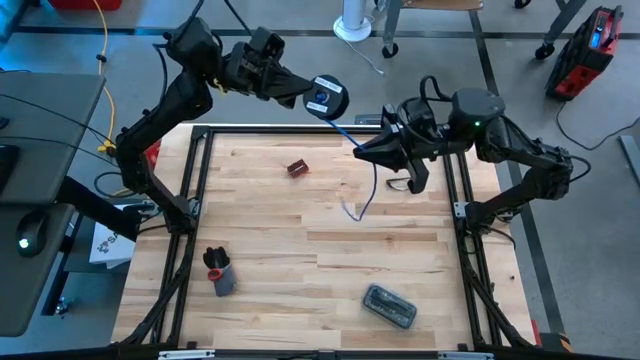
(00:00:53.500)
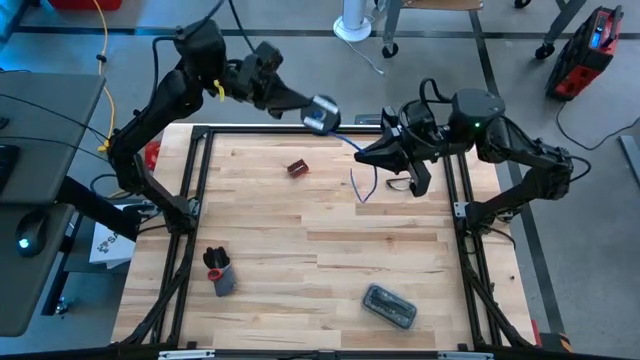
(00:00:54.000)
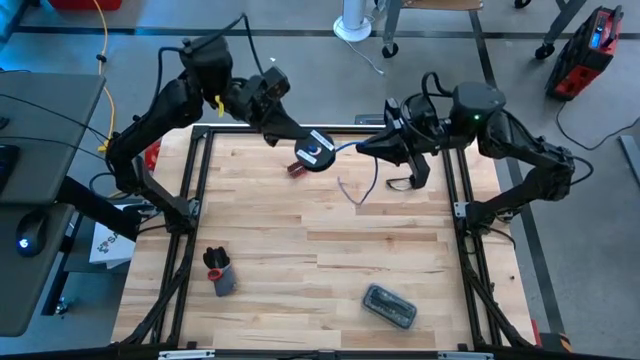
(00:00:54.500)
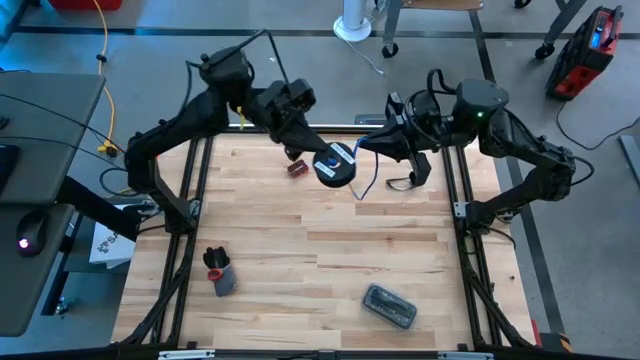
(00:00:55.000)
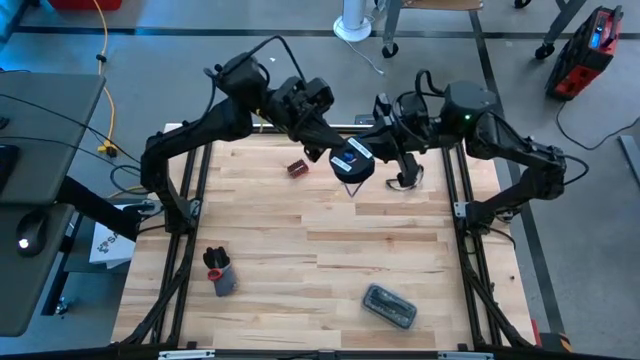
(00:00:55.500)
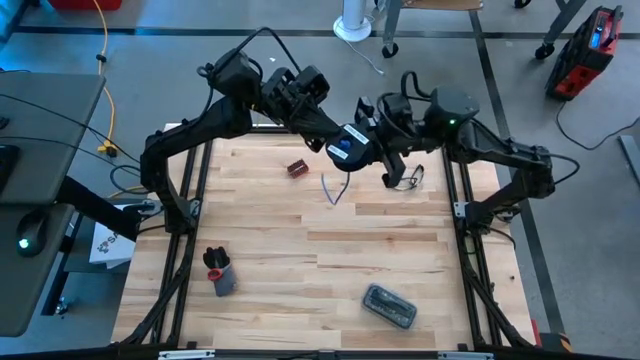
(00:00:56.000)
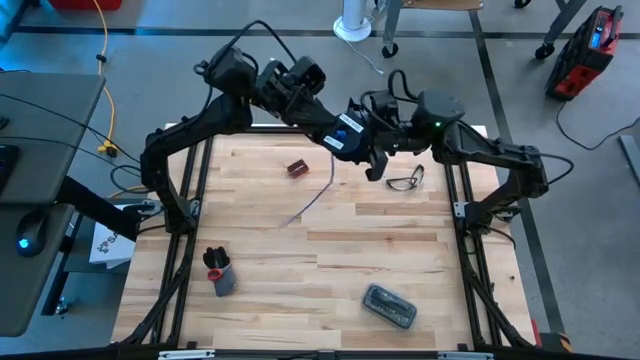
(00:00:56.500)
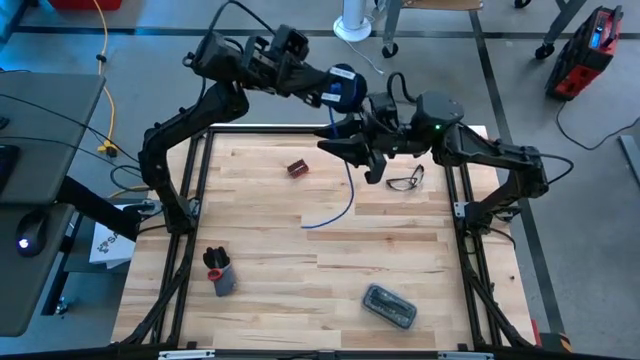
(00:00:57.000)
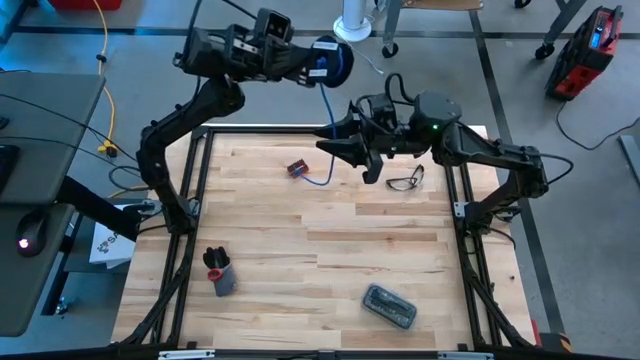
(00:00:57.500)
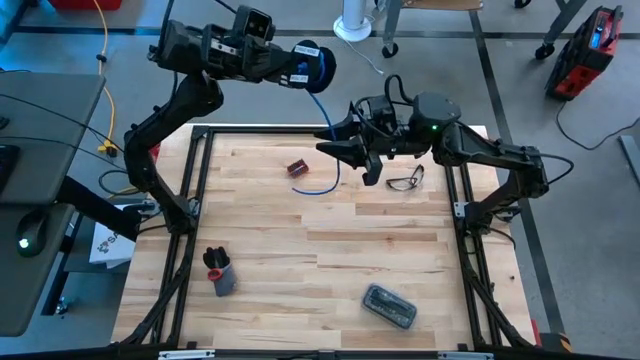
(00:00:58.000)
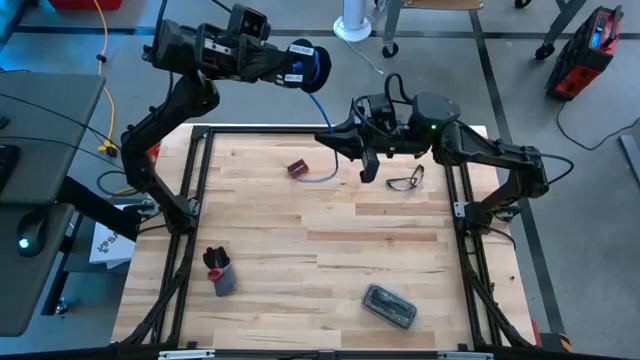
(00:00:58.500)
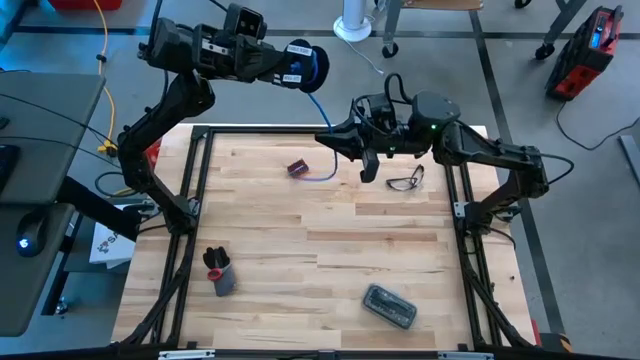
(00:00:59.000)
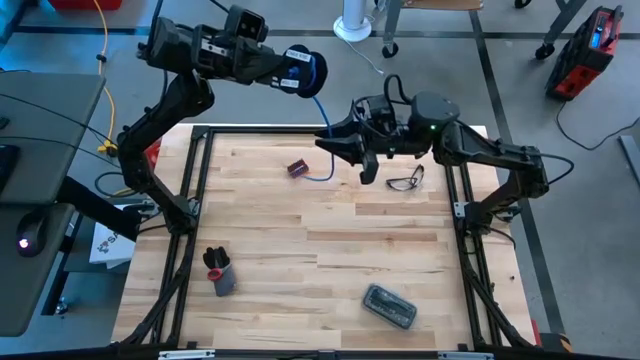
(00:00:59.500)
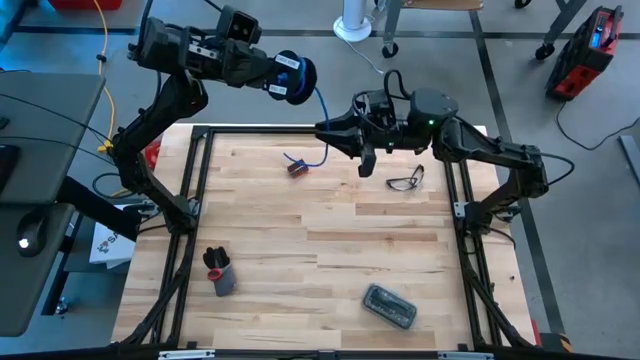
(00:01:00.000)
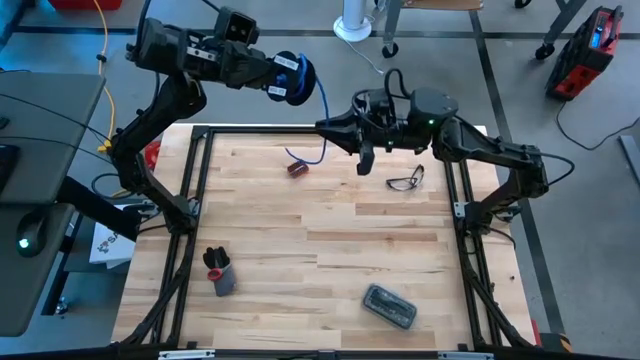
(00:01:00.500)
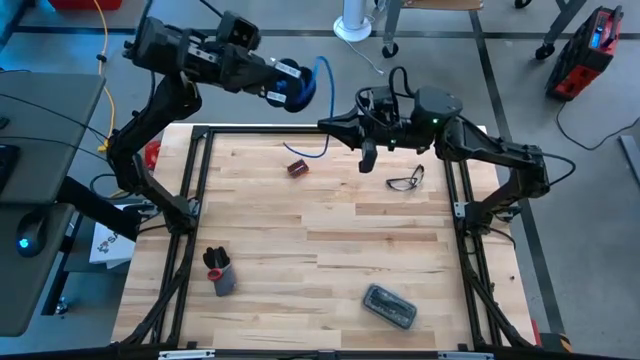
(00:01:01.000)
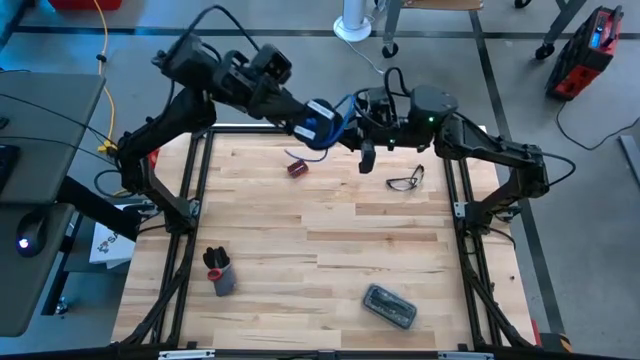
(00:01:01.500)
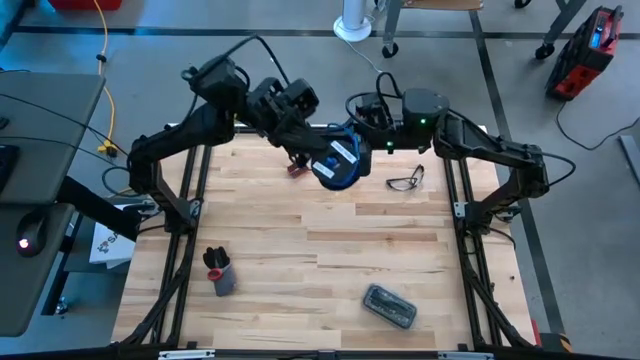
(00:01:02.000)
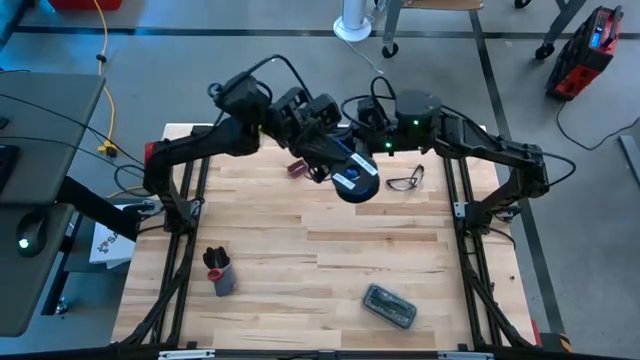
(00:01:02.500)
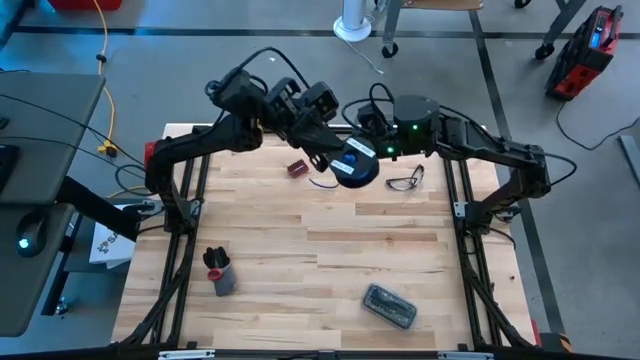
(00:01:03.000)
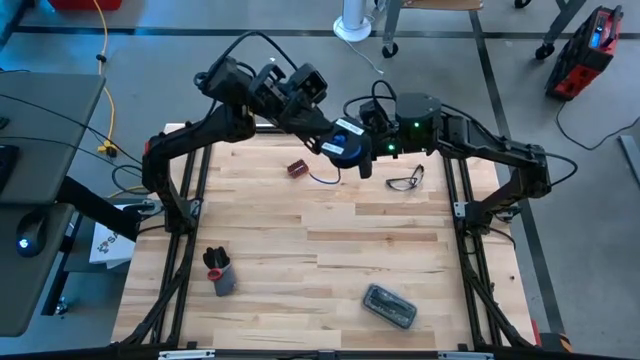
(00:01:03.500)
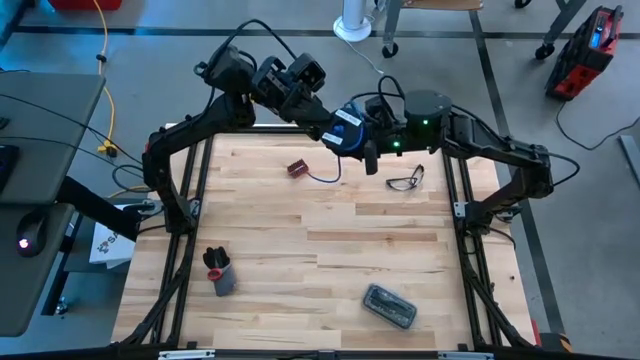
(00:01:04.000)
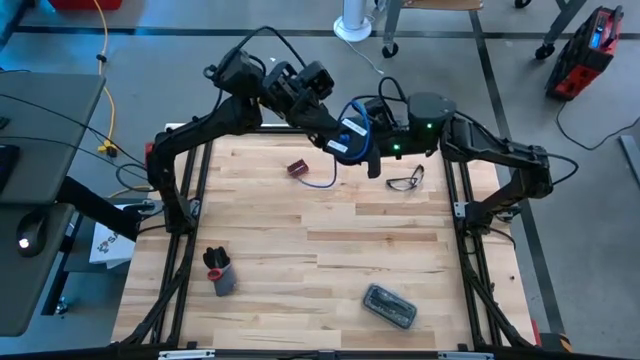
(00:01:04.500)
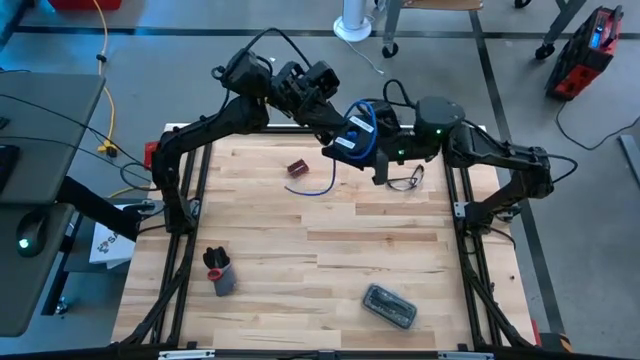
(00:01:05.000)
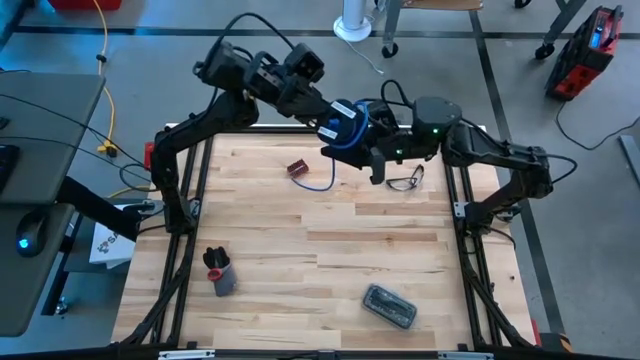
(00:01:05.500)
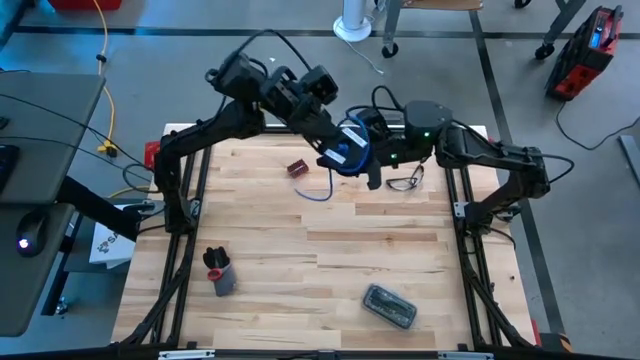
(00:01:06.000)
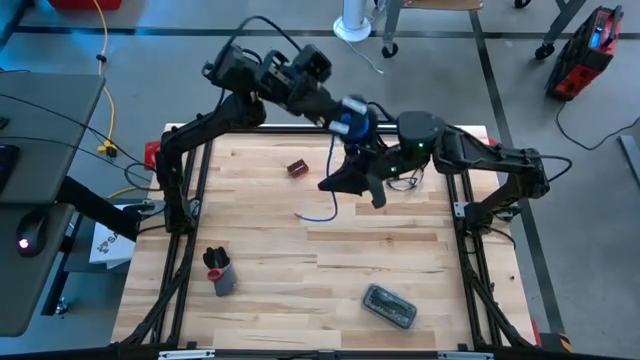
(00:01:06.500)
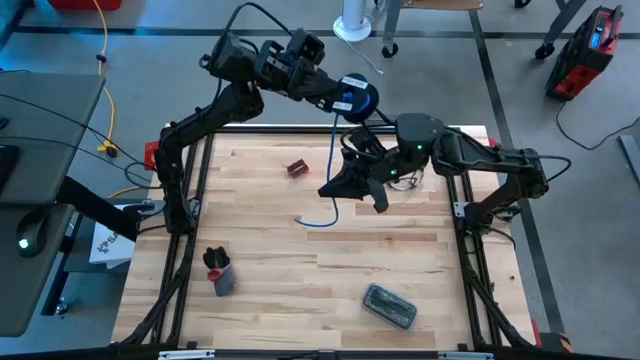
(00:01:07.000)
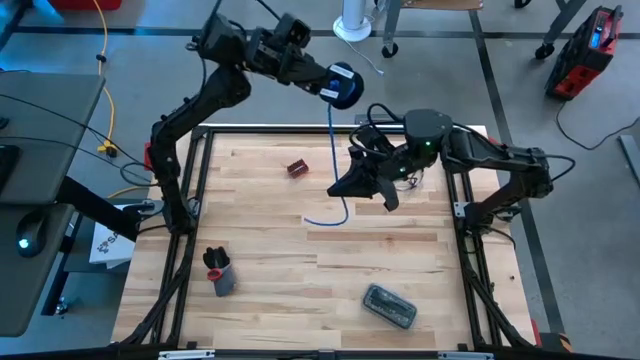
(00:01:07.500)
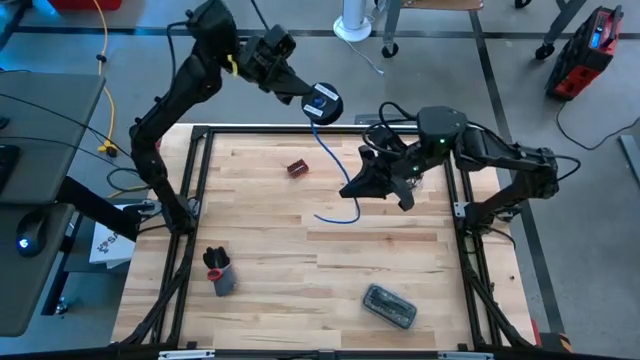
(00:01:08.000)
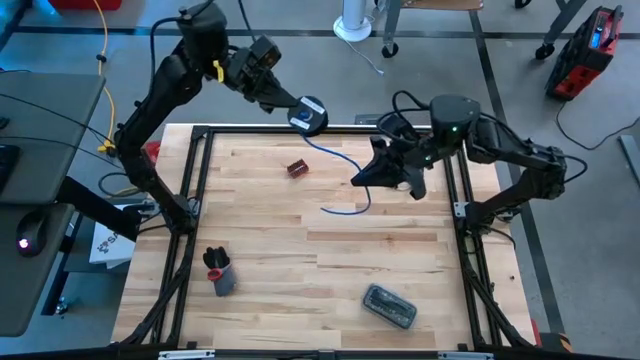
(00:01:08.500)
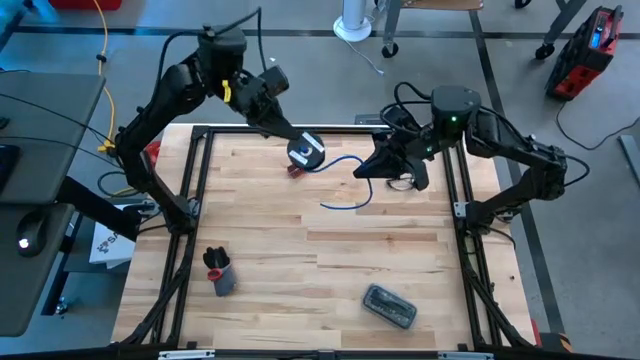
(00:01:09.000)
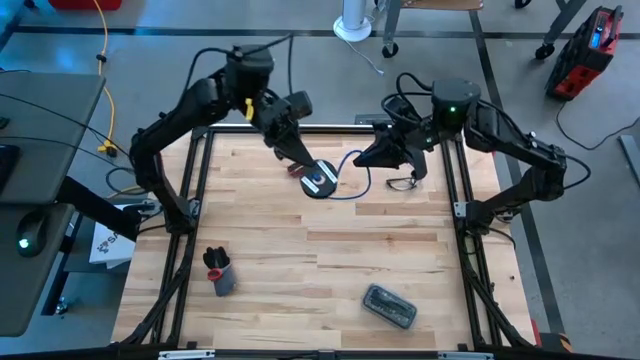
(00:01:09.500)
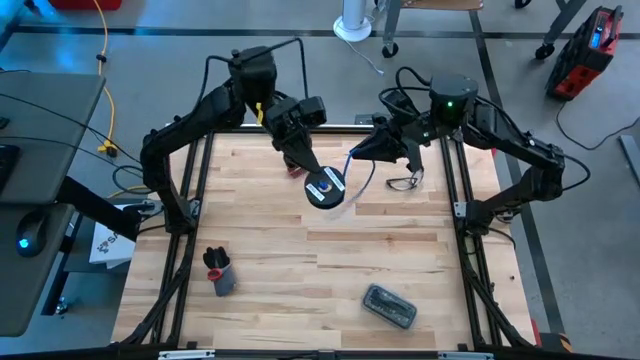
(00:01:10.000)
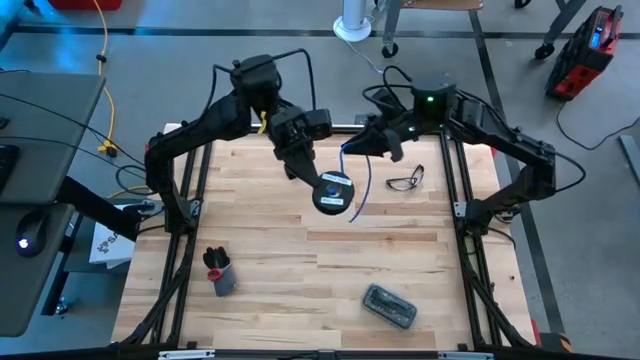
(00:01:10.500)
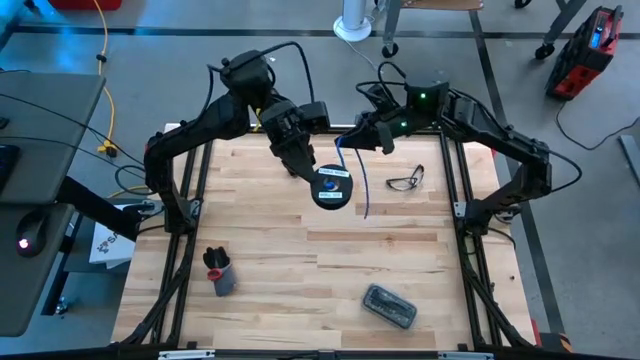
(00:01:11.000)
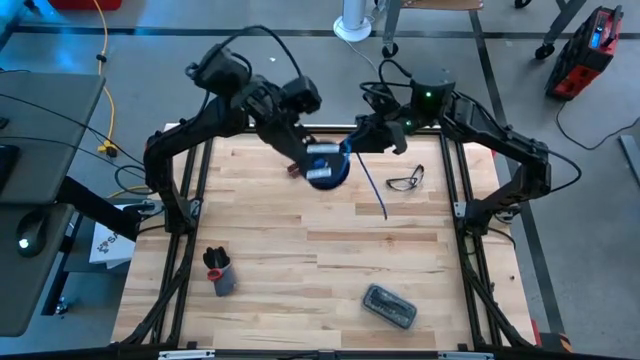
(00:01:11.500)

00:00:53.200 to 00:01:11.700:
Task: Coil cords
Coil the blue wire onto the spool
